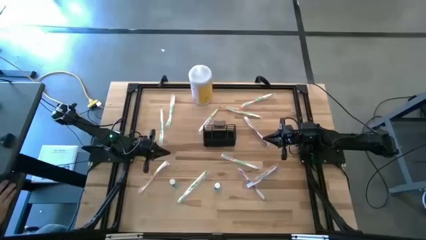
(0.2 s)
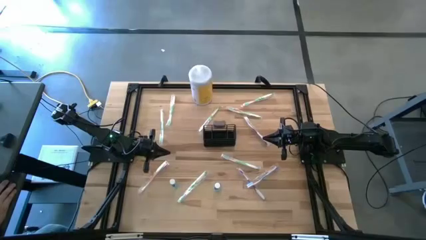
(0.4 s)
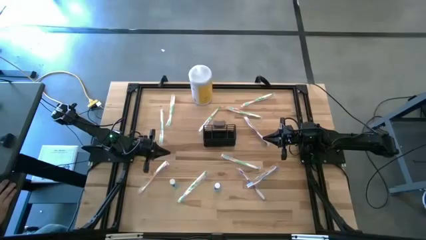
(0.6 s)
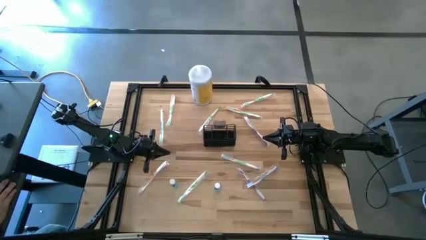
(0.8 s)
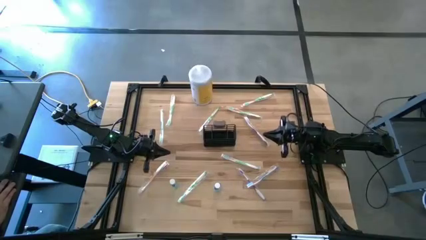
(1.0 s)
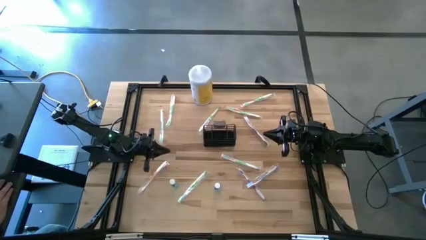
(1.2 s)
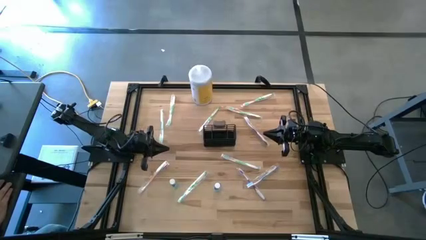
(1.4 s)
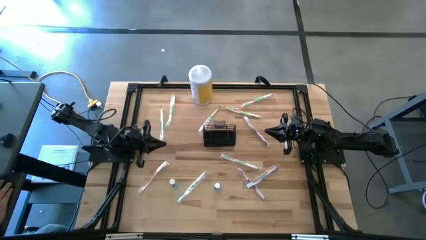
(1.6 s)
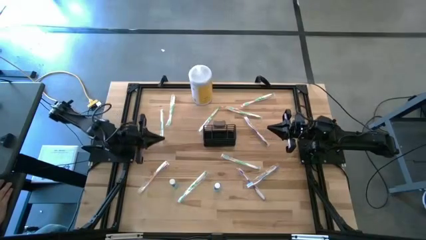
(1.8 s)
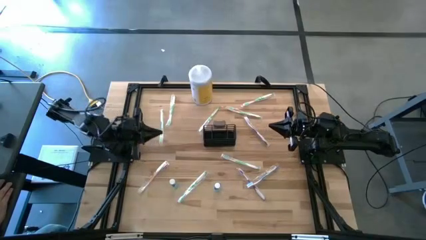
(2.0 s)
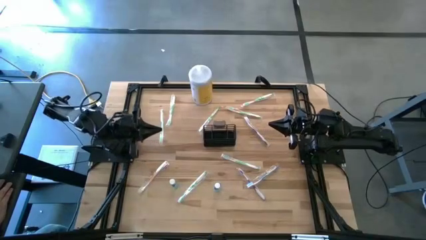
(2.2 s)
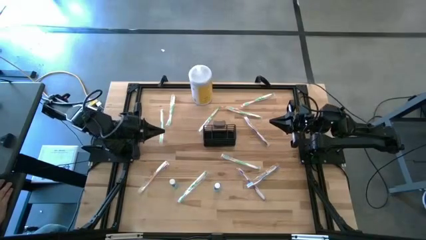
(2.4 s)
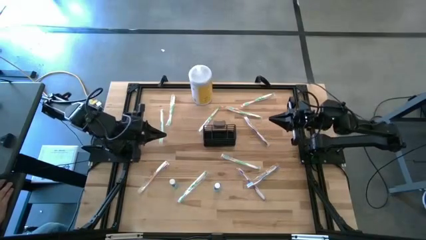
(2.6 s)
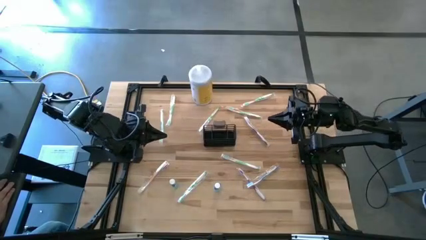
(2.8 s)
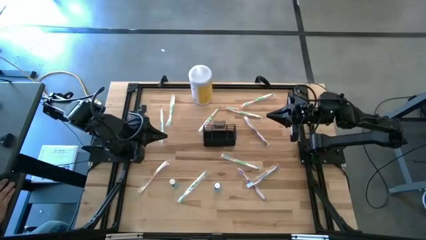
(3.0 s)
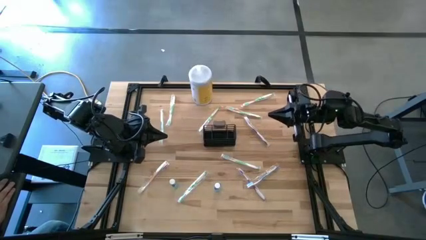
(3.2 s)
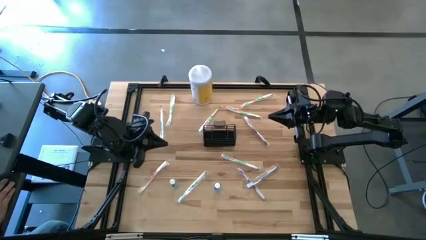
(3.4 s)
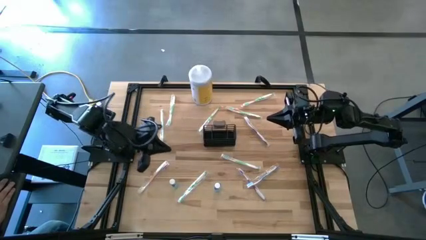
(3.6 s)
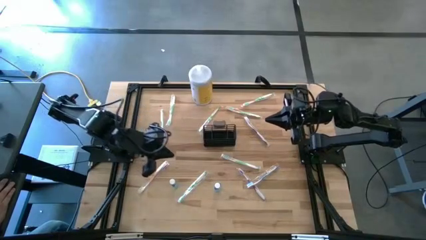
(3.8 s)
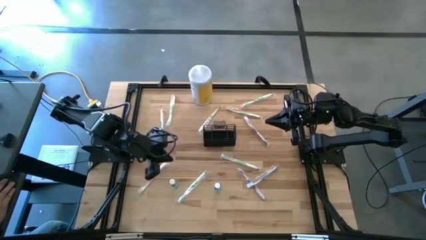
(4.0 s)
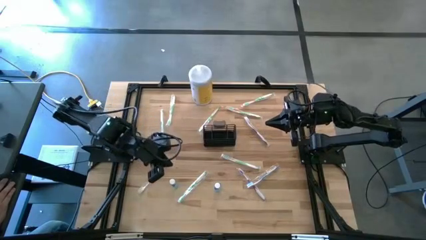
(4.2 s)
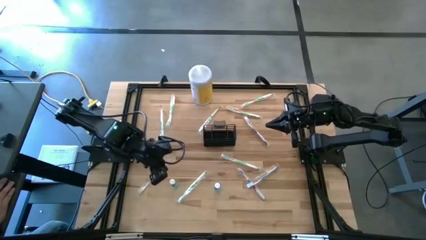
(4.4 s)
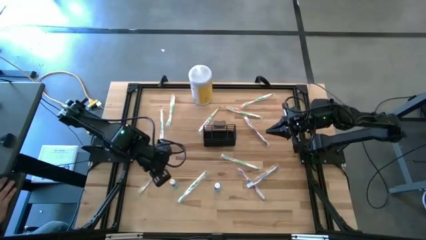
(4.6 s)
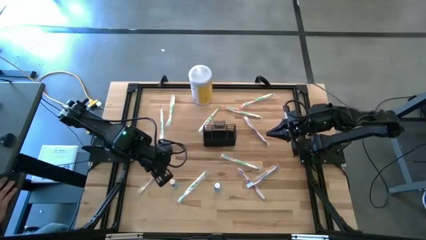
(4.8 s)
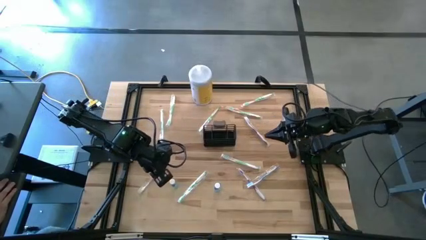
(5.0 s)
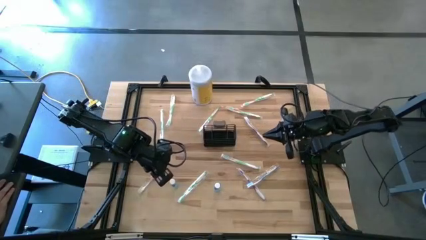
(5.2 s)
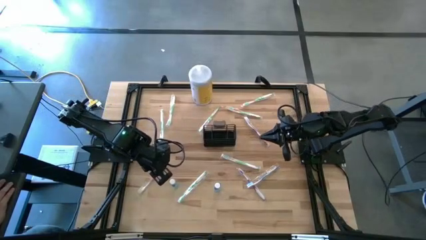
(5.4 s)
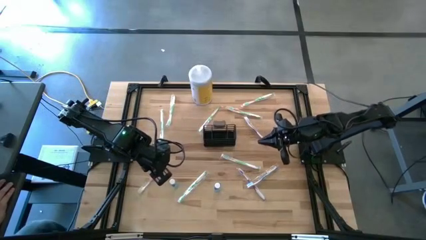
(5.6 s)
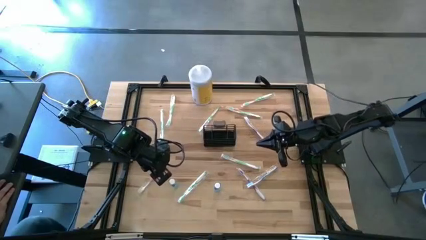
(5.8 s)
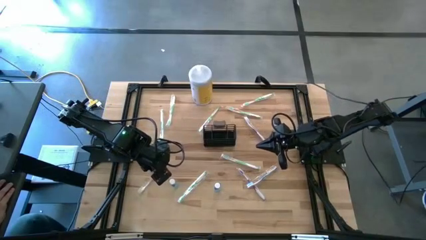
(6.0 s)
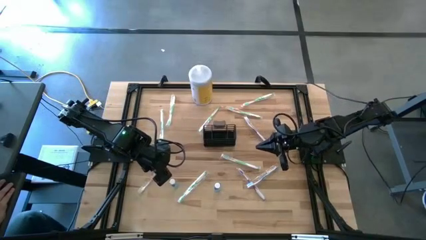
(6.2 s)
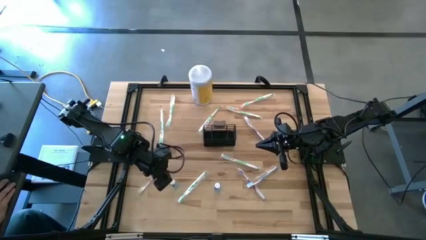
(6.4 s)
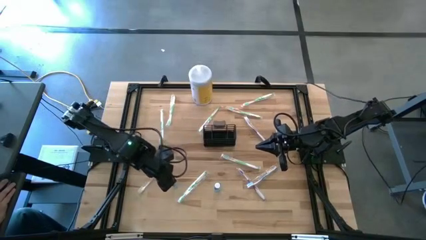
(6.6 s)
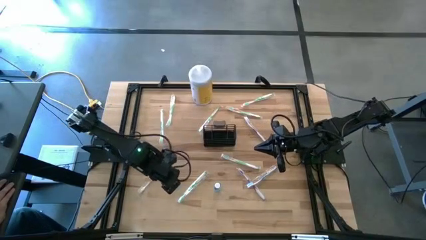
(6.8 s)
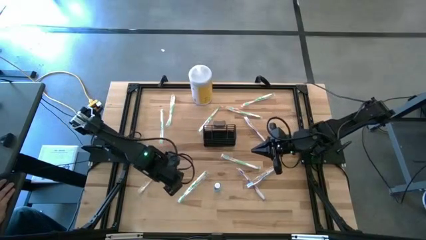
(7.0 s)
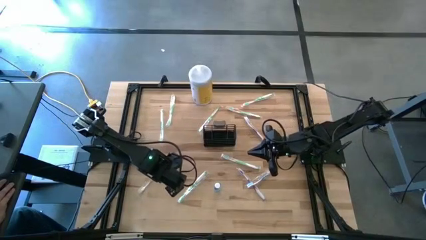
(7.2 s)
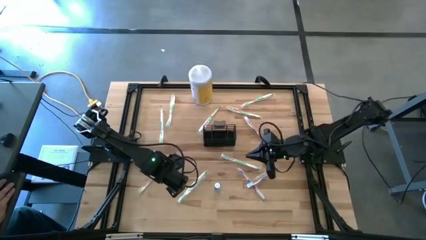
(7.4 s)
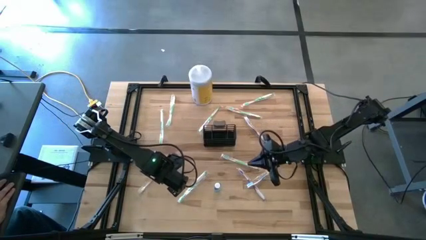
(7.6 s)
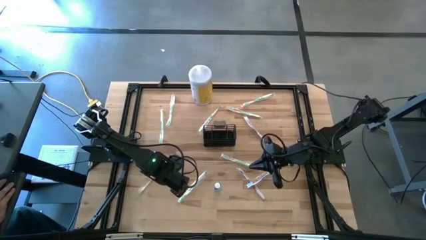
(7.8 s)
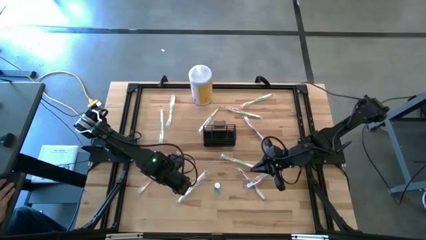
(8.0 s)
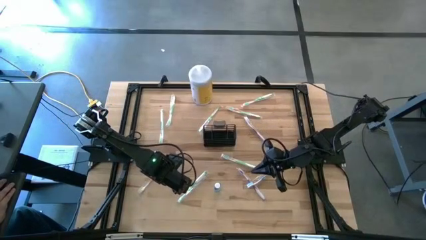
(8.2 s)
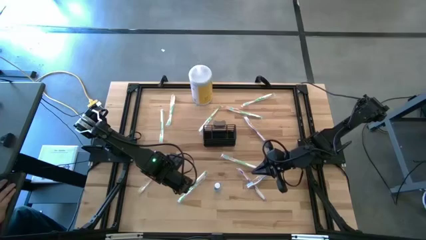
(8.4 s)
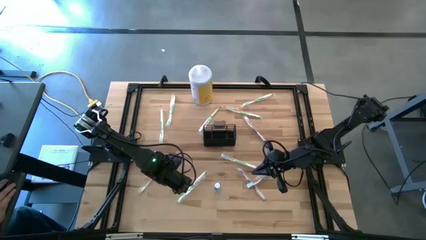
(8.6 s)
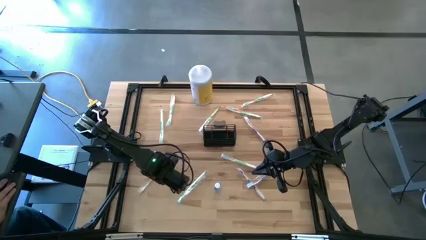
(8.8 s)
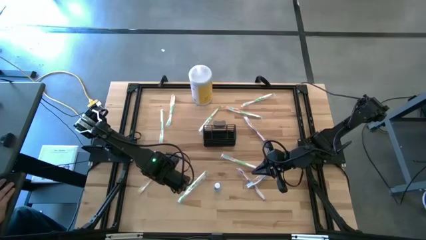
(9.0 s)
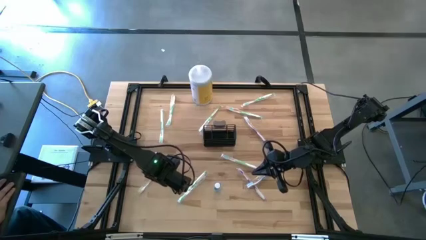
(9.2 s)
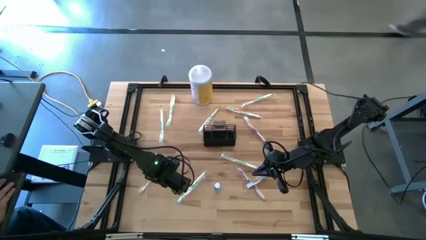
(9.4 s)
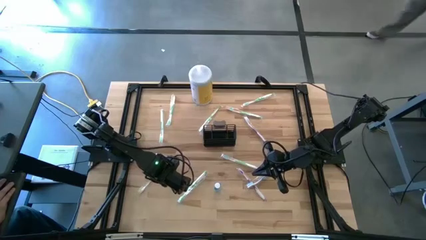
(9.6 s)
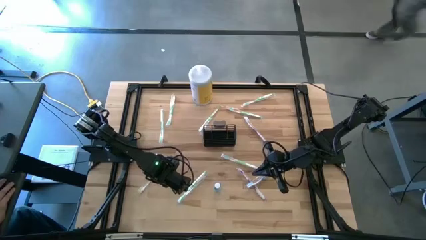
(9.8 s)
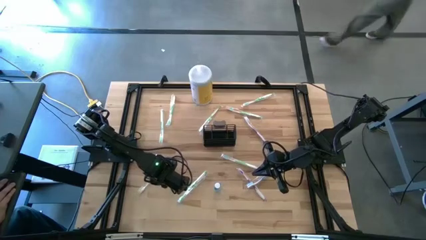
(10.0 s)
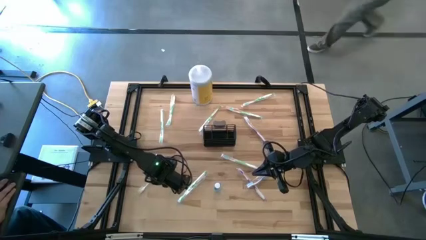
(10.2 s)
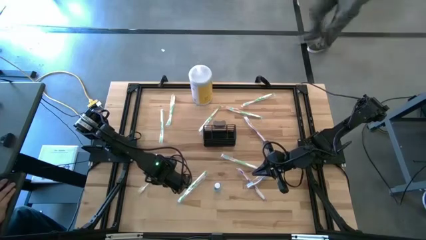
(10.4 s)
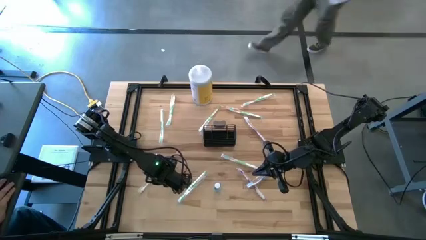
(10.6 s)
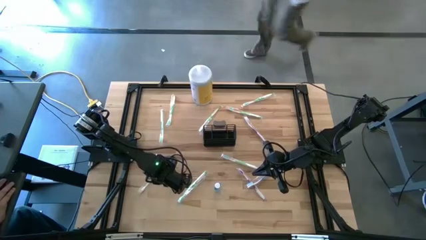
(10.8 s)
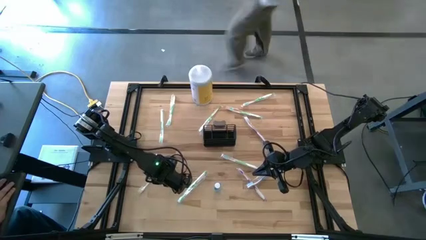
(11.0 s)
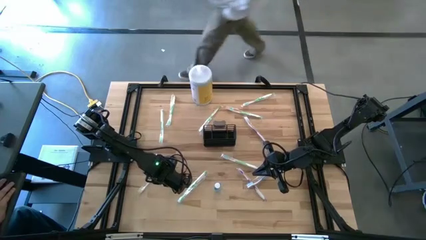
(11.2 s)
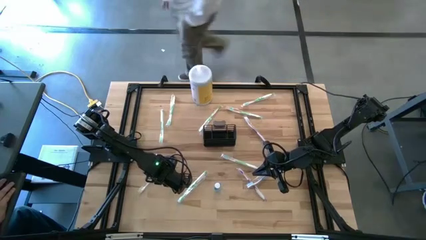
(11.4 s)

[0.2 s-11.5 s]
Task: Pick & Place toothbrushing station
Put the left mouthwash into the middle section wire organizer
